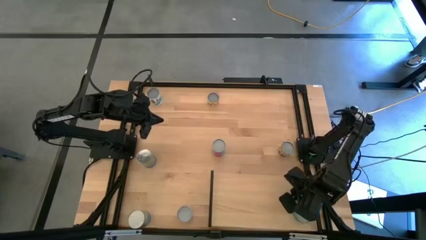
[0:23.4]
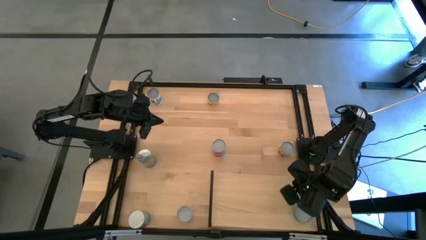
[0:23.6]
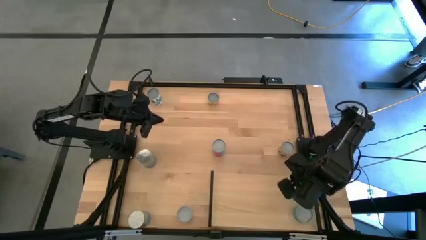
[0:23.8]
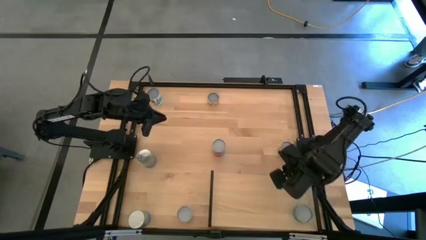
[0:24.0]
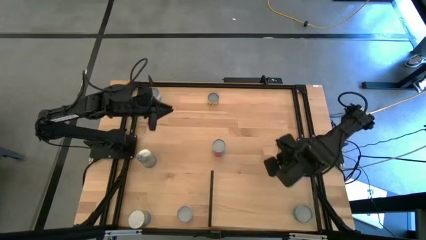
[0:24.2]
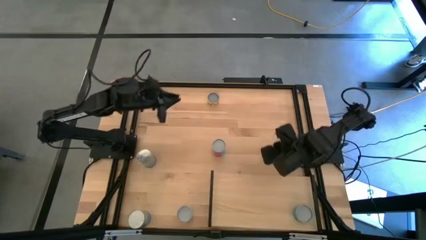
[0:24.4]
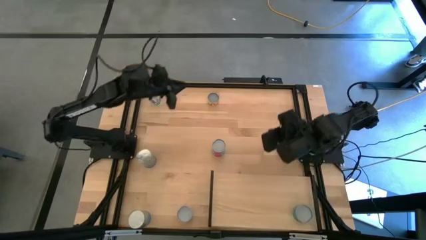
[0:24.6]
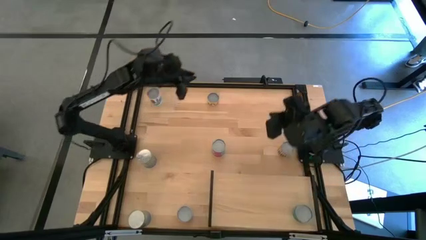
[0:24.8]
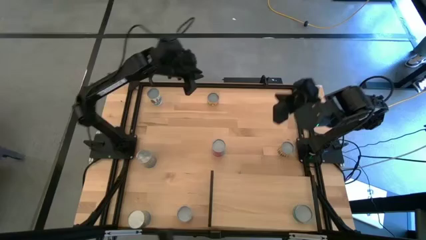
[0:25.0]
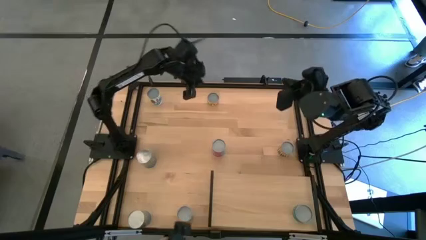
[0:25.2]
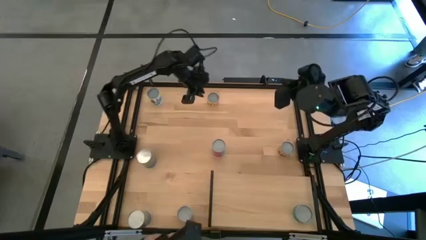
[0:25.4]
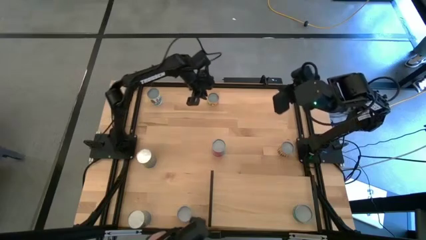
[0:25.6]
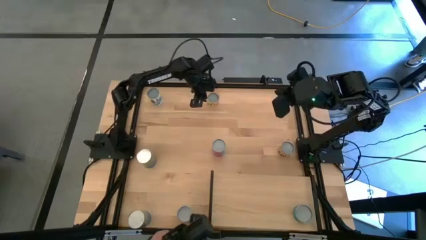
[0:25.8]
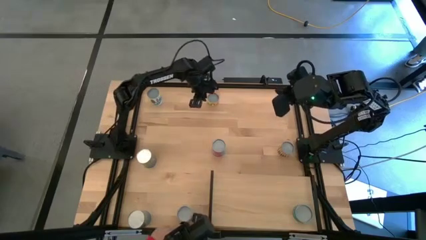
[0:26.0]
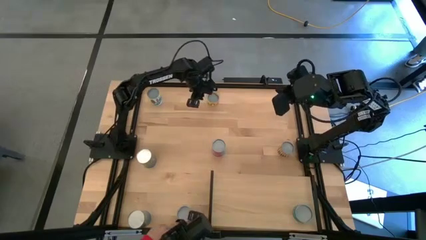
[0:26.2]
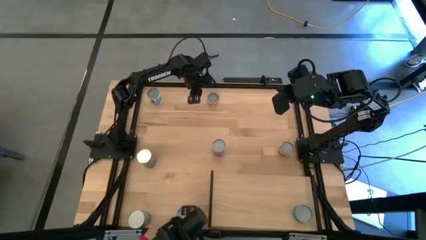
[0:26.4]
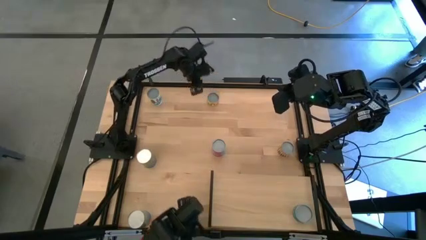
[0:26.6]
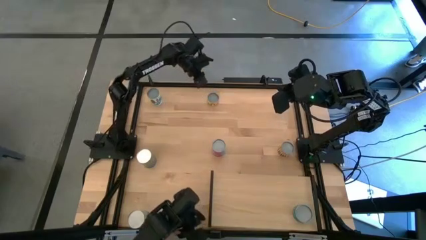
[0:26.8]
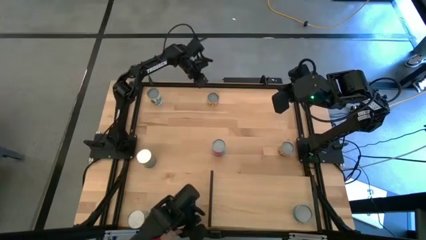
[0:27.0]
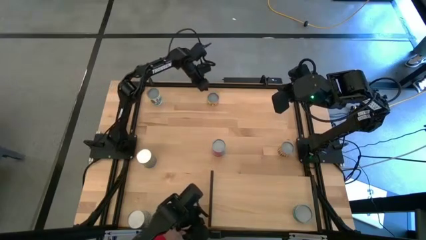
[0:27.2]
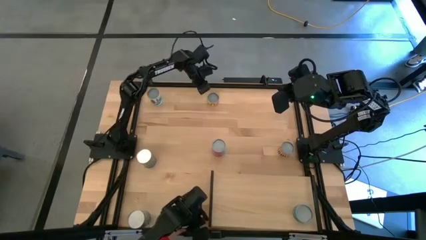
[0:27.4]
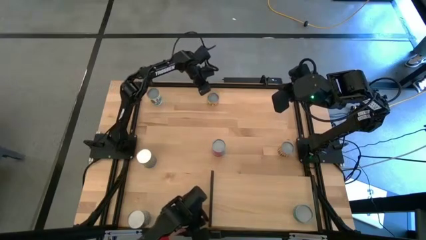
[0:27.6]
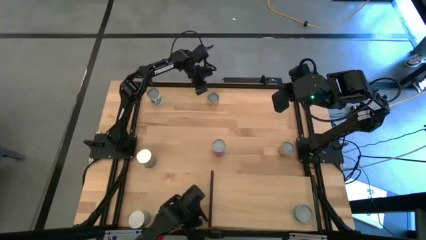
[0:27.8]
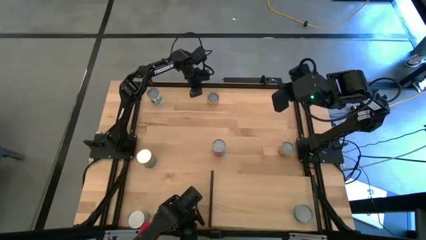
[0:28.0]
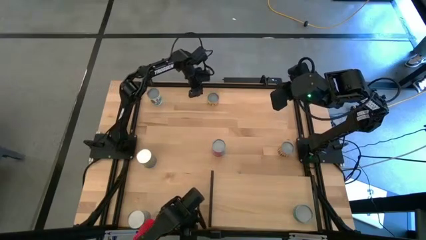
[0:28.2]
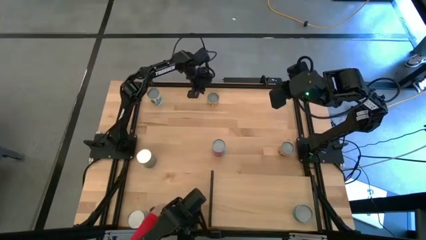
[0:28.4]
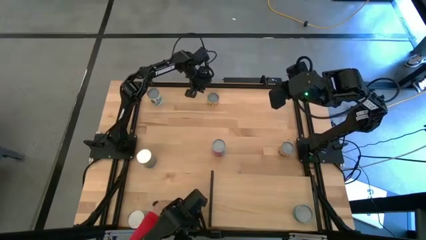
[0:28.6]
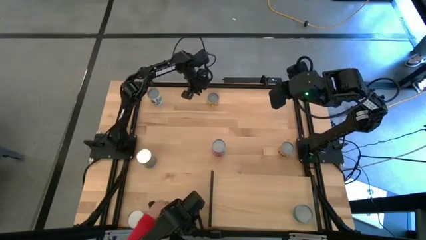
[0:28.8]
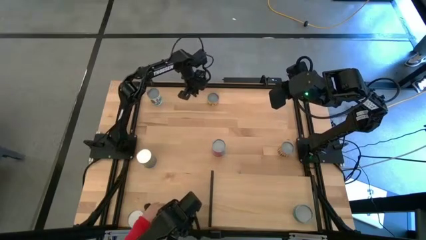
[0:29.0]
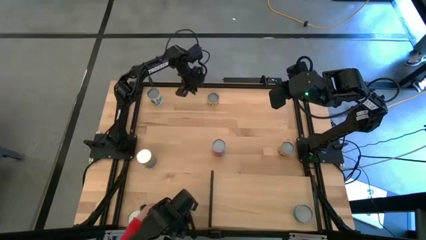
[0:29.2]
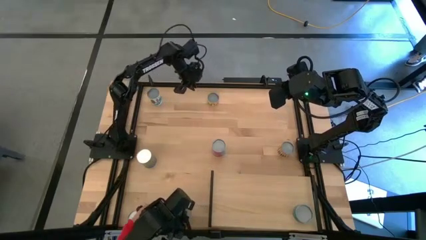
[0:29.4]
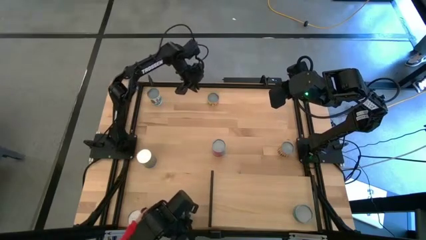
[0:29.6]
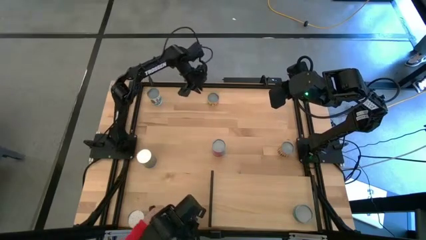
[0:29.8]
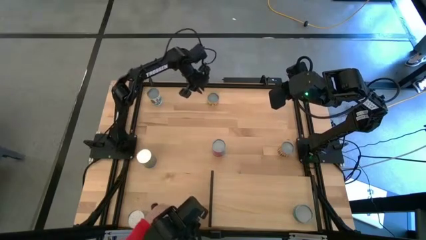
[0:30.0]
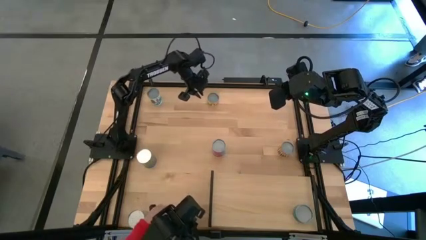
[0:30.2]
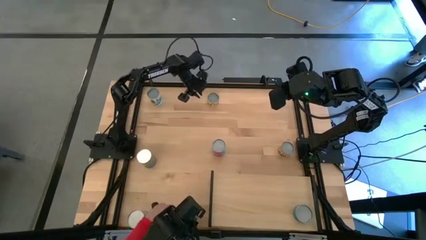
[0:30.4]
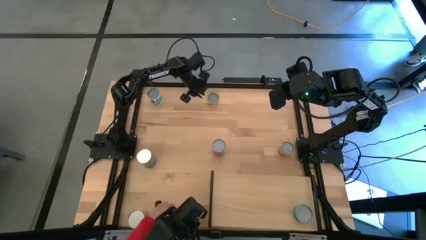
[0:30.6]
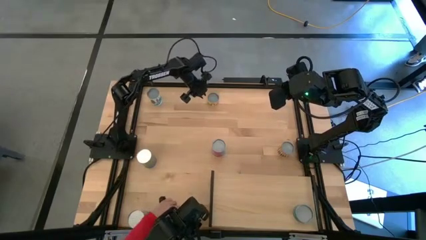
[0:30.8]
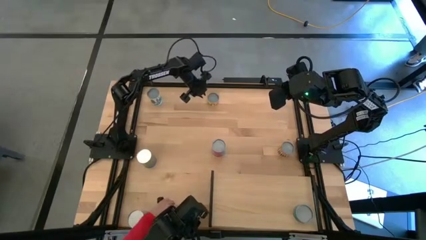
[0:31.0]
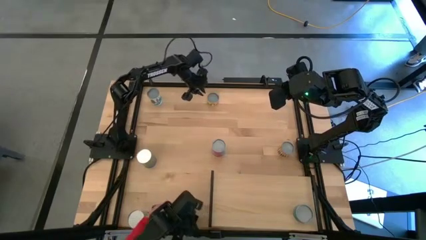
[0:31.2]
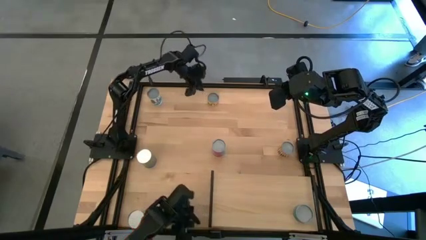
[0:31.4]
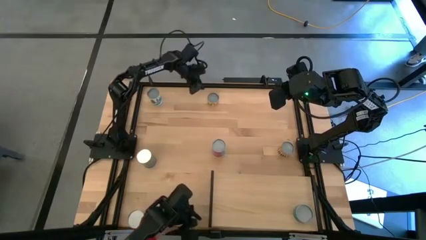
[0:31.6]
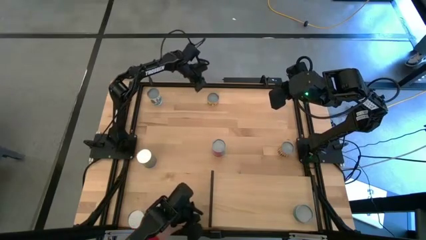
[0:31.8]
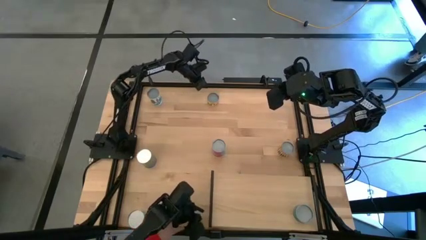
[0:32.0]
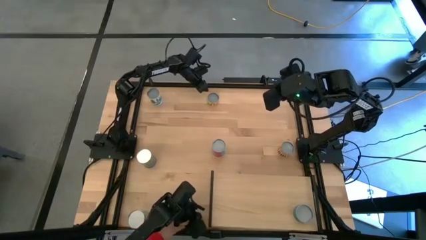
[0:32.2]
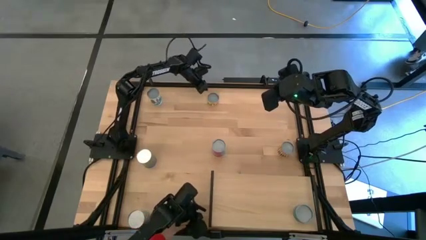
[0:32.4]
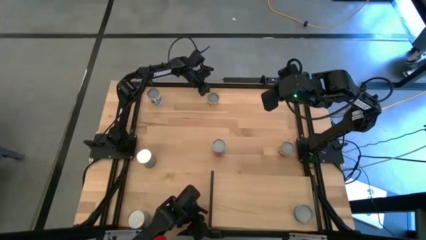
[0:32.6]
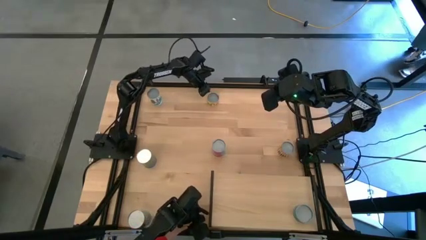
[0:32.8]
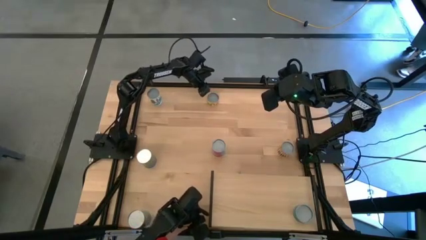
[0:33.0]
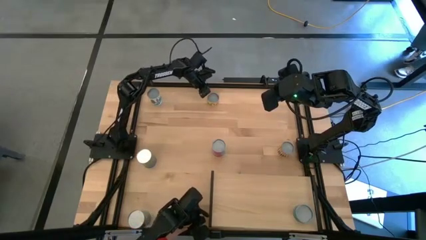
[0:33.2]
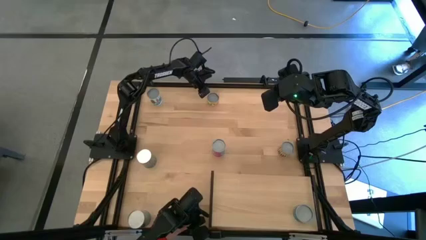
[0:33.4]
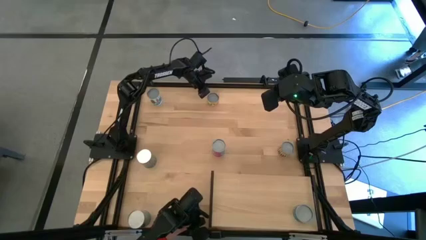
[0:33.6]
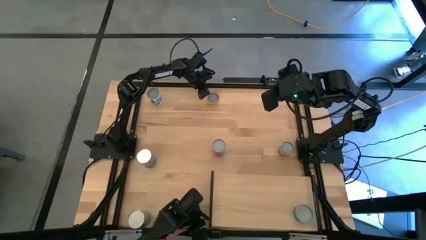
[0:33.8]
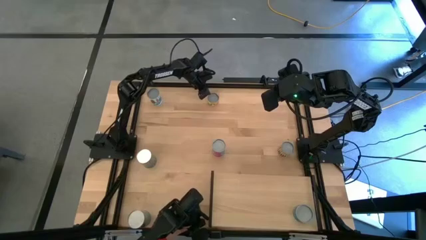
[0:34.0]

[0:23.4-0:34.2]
Task: Pick and place cans onto a shelf
Put the canned mushroom on the shelf
